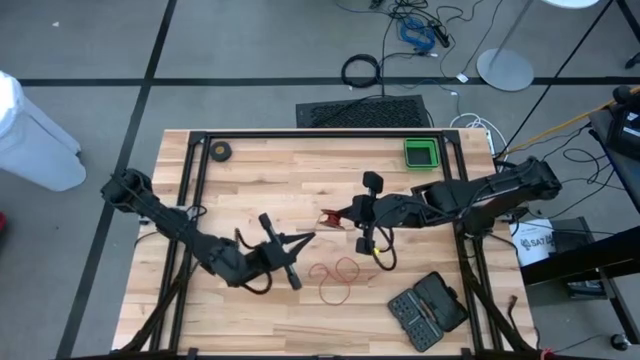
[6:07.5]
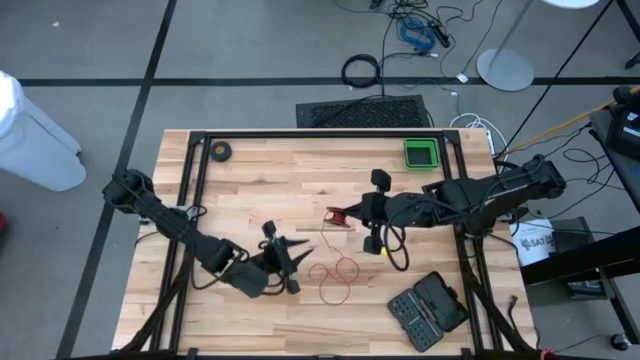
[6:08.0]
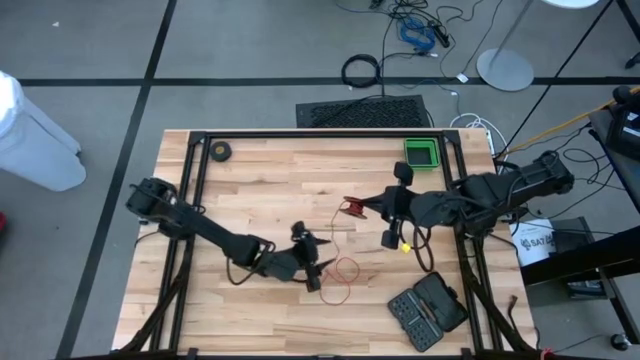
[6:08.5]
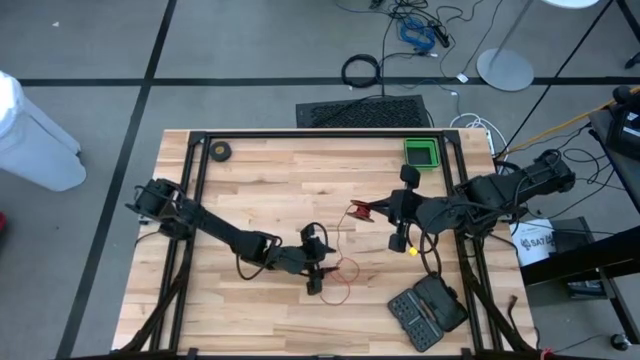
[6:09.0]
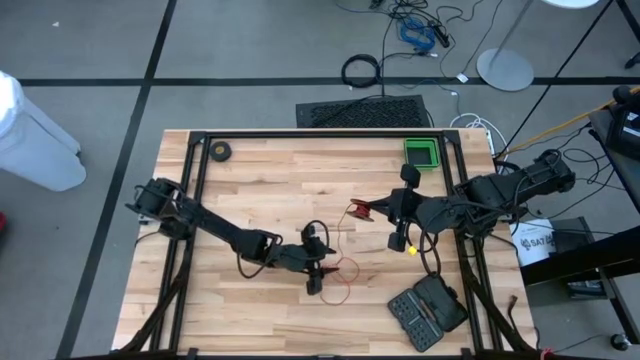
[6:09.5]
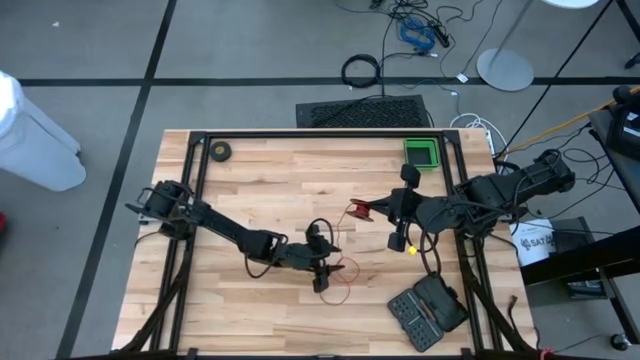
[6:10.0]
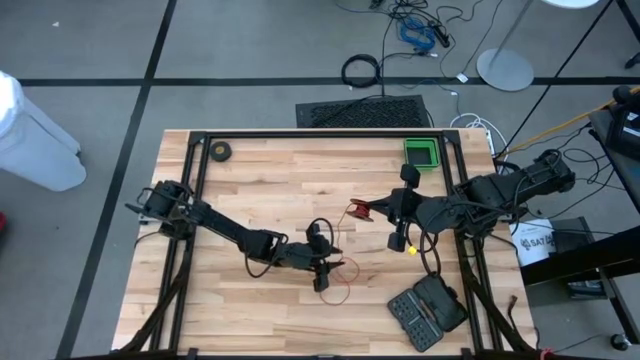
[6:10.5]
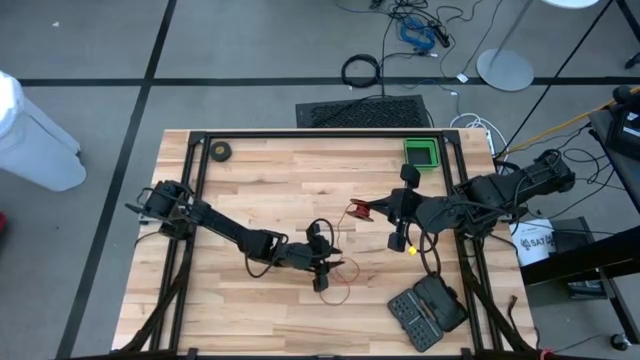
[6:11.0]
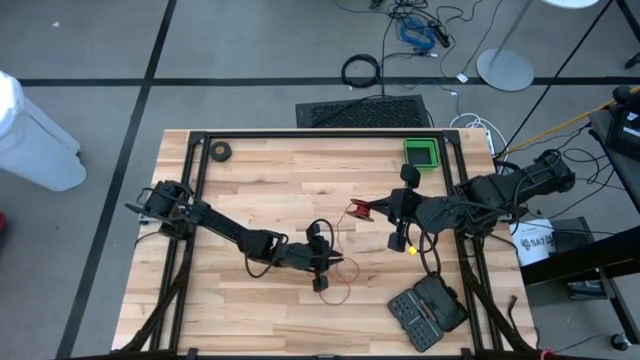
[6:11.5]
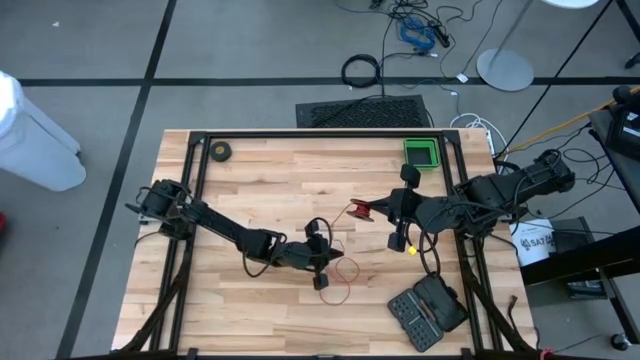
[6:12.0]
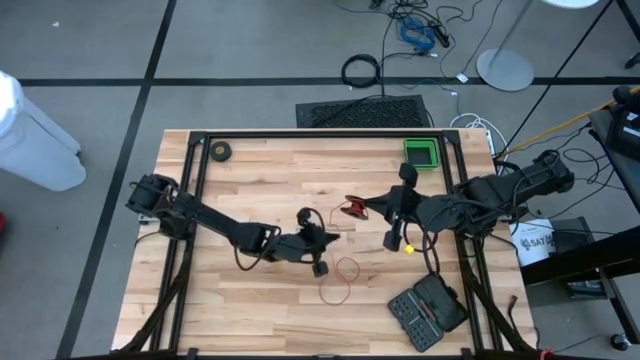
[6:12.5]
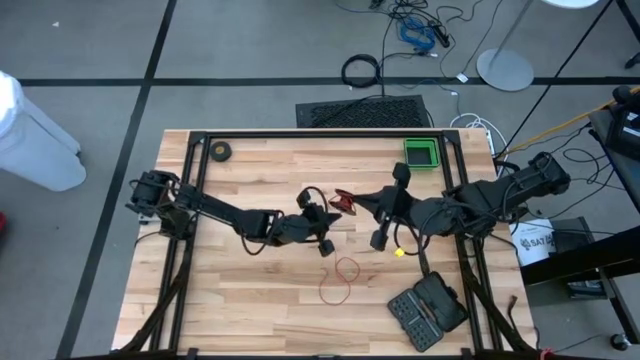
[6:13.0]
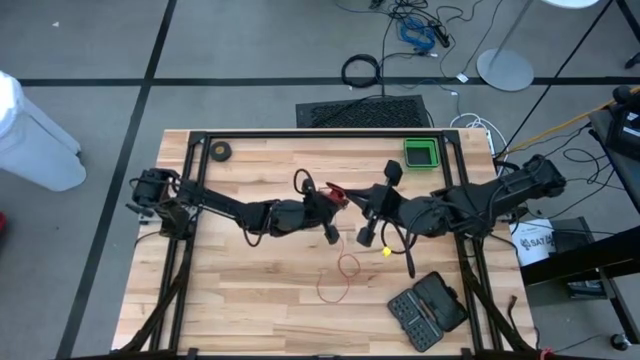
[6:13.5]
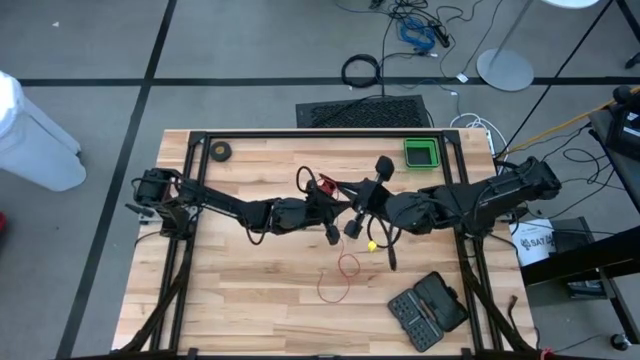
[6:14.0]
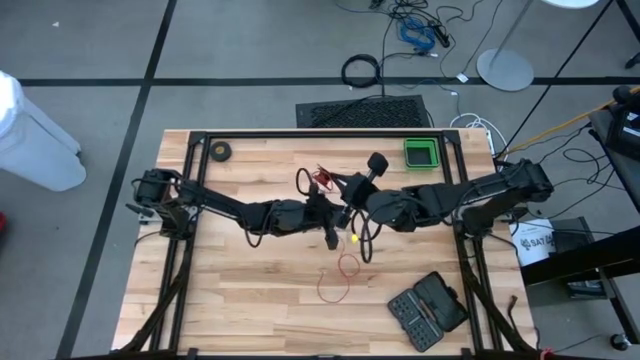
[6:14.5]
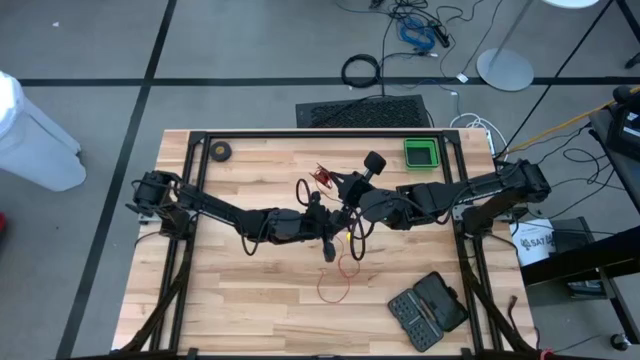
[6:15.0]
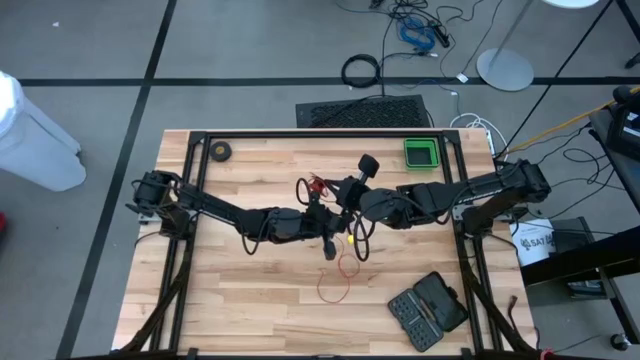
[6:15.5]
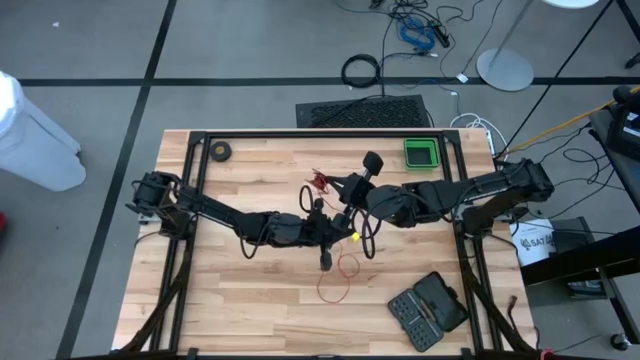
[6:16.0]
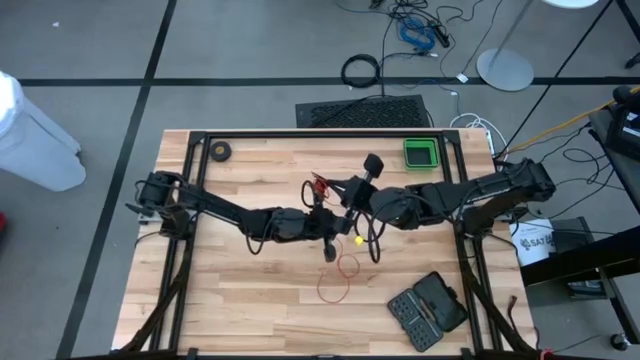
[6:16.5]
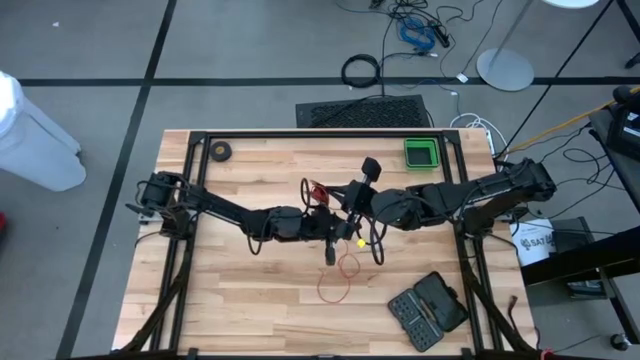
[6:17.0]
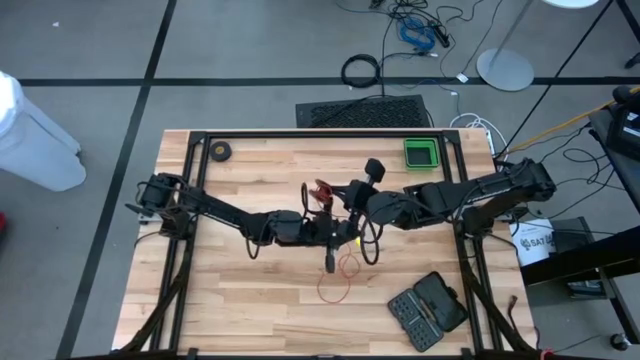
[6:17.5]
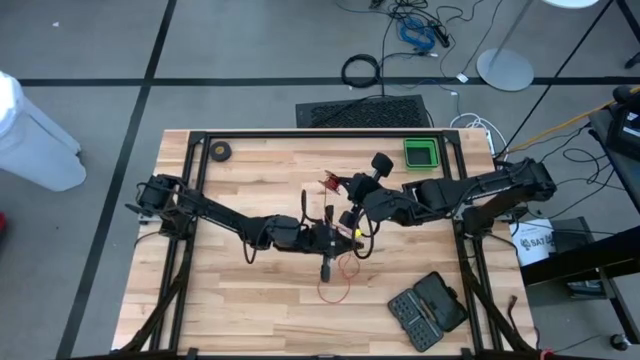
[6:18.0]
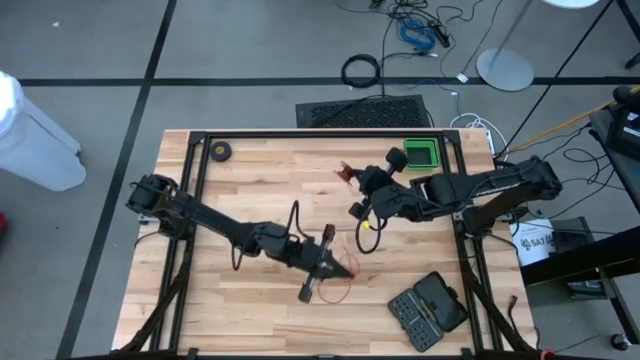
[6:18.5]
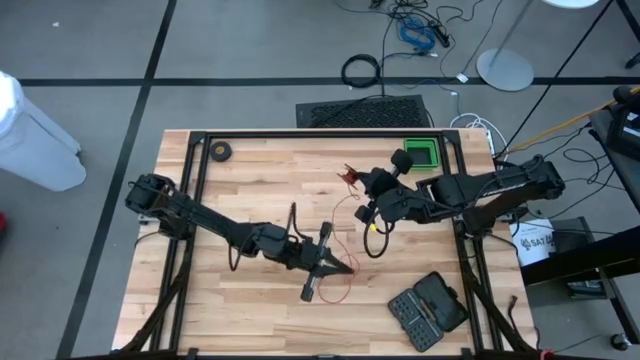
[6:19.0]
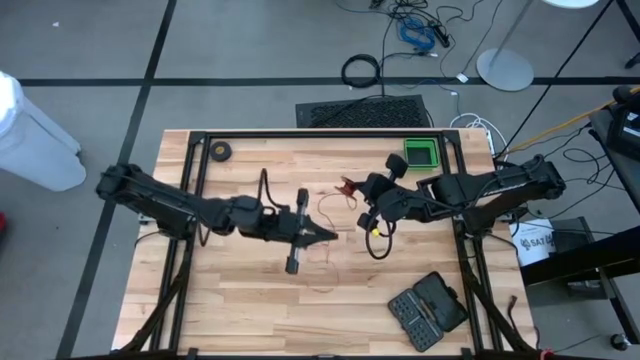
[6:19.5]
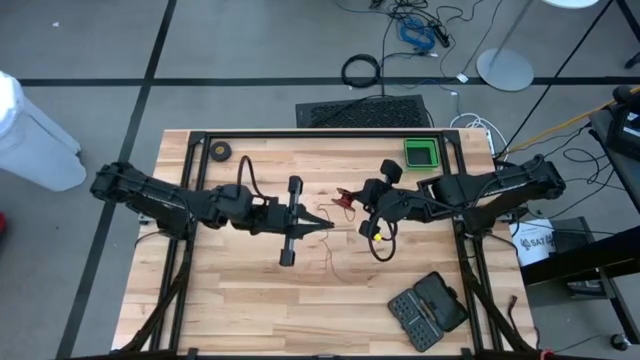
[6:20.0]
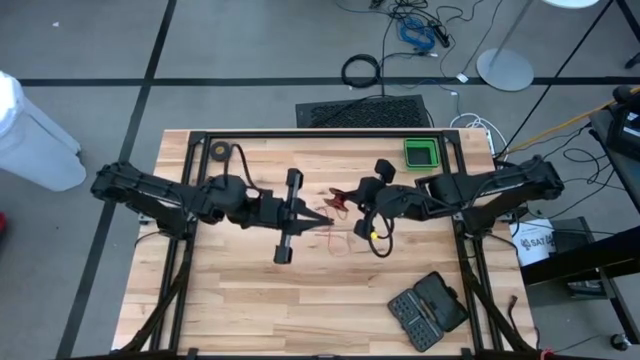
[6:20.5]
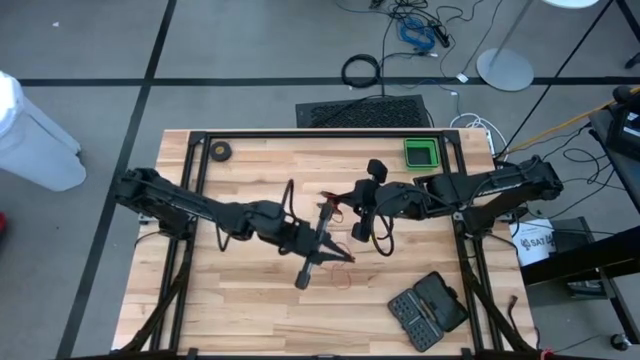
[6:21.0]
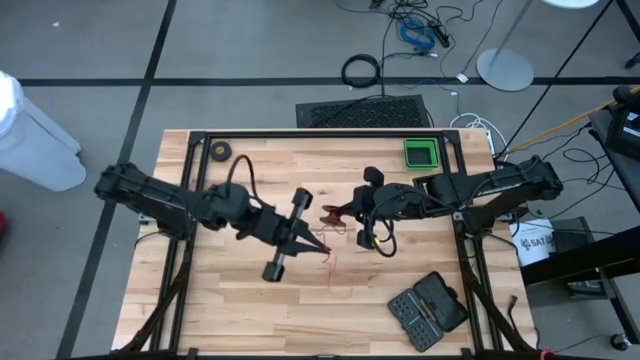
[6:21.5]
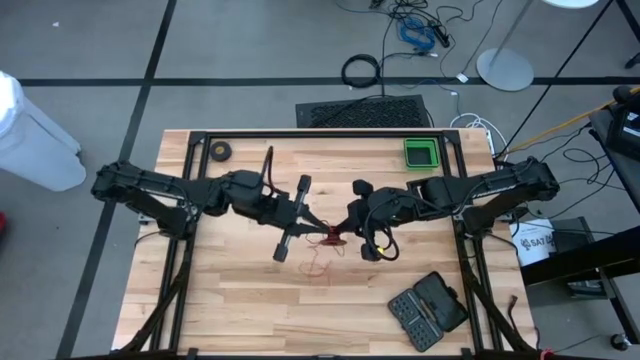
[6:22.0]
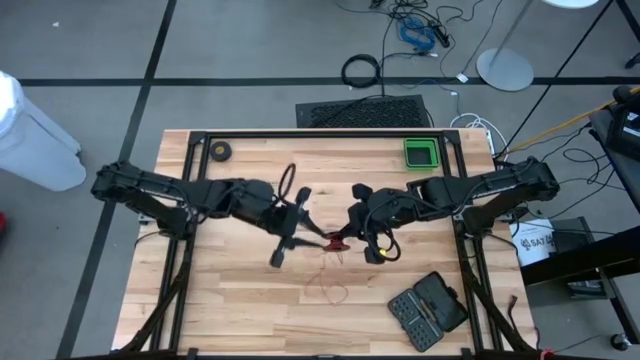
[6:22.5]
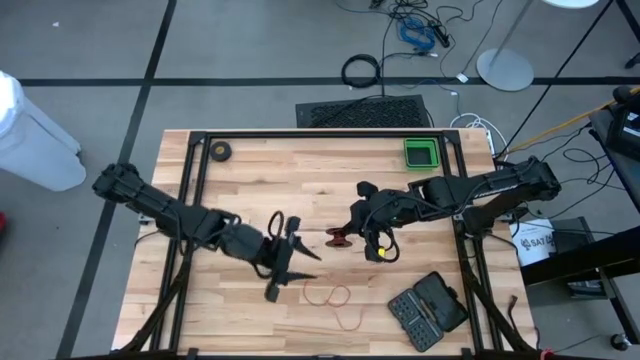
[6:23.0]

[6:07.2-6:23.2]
Task: Coil cords
Coil the red wire into the spool
